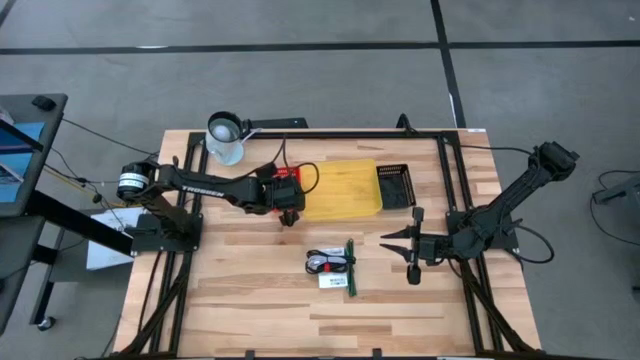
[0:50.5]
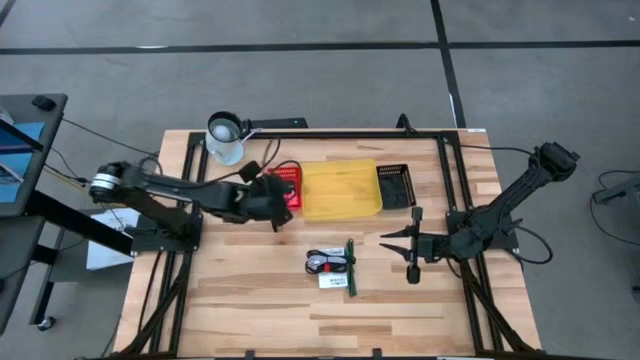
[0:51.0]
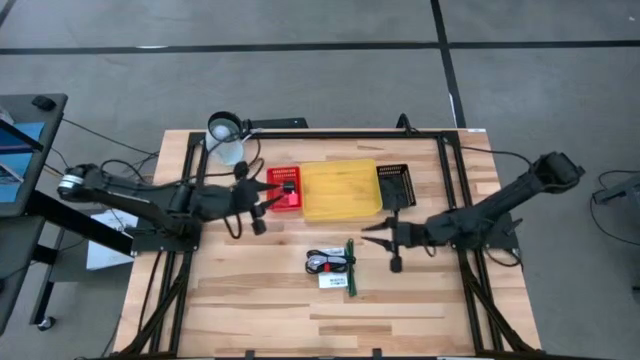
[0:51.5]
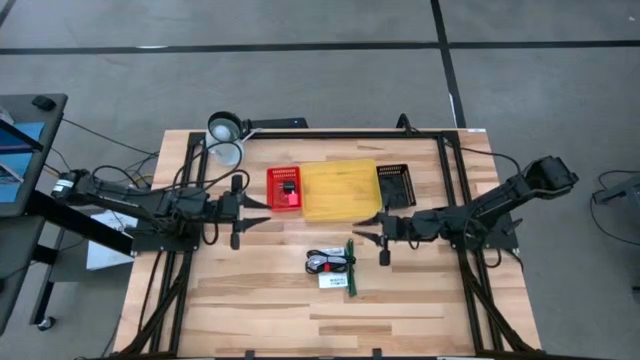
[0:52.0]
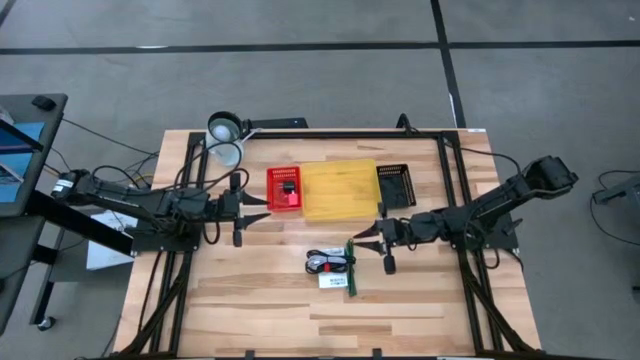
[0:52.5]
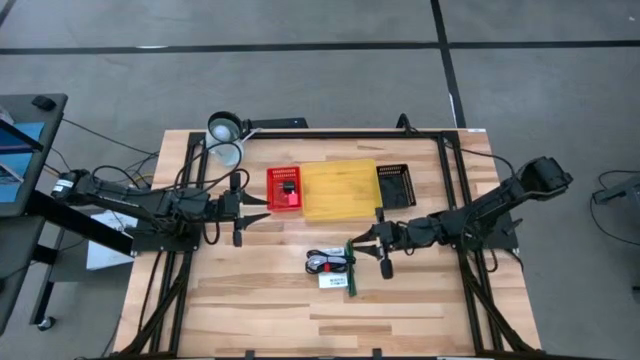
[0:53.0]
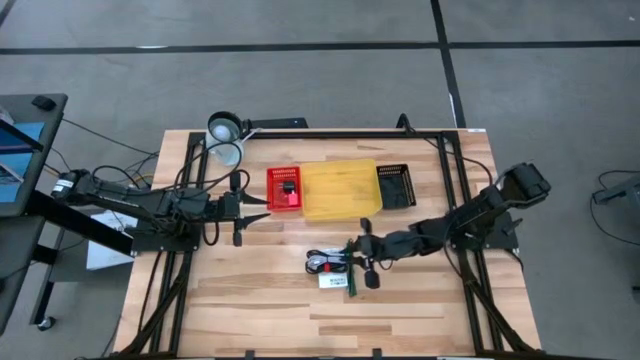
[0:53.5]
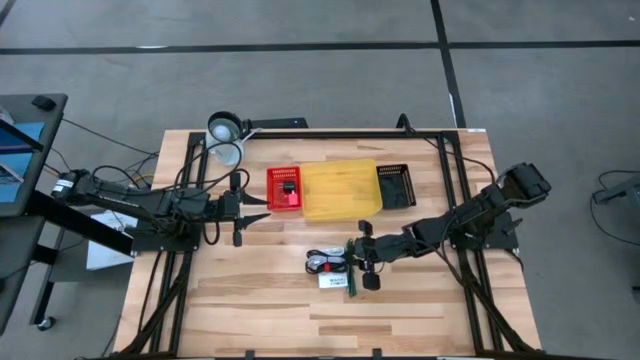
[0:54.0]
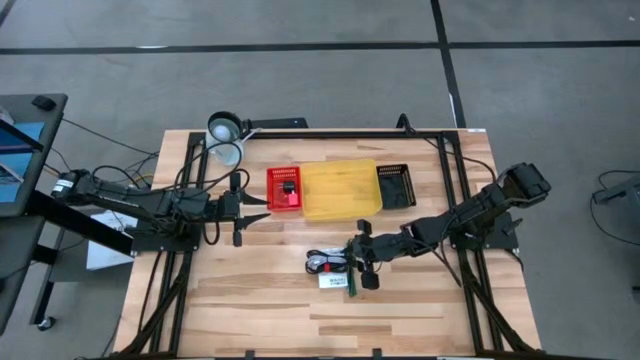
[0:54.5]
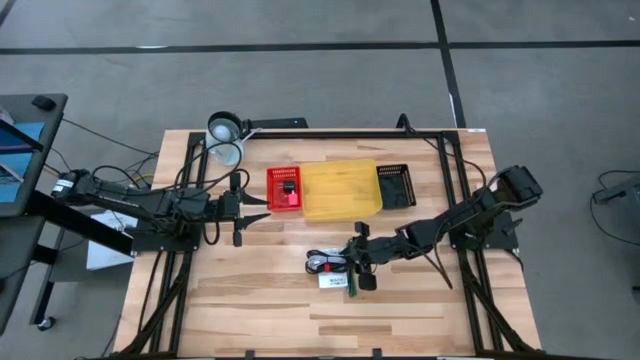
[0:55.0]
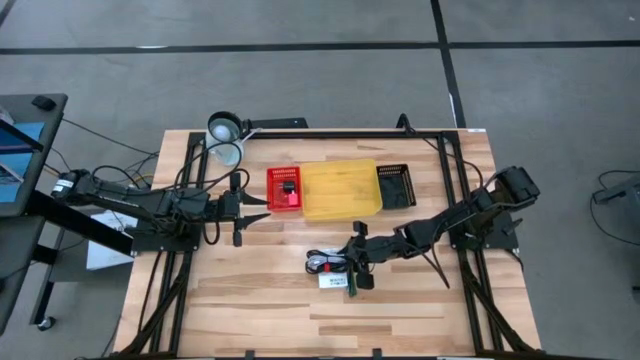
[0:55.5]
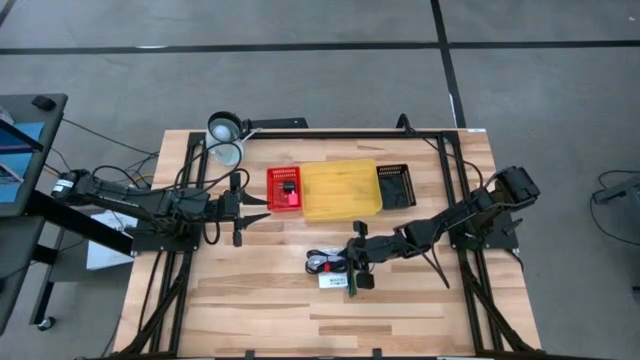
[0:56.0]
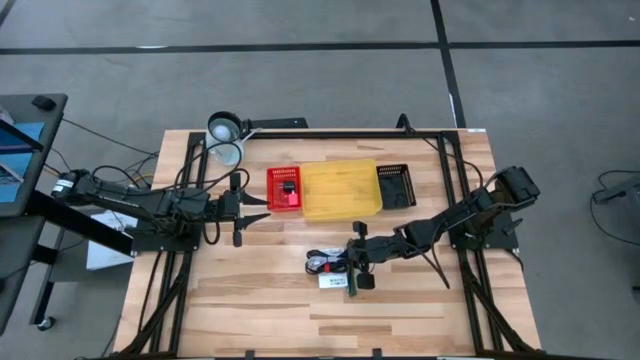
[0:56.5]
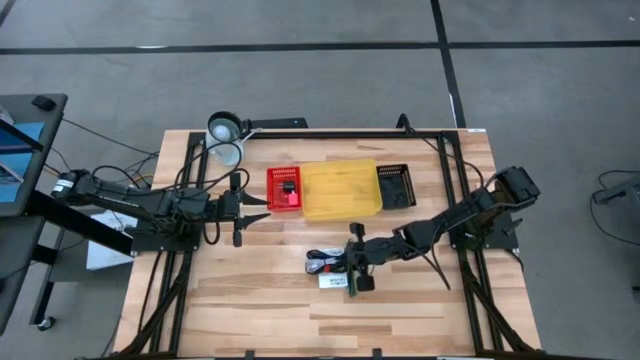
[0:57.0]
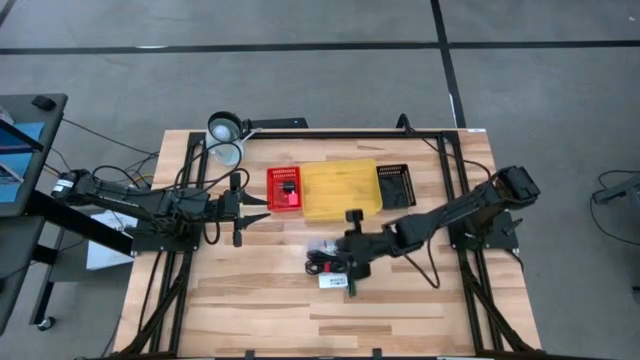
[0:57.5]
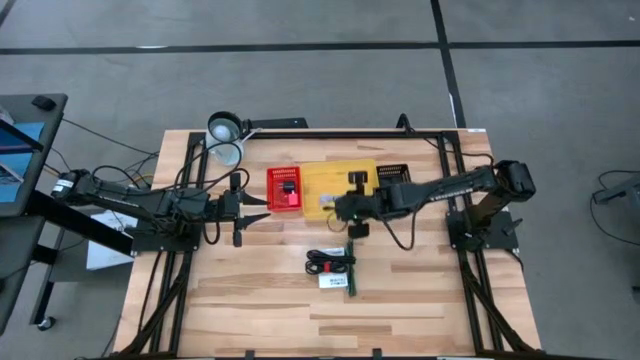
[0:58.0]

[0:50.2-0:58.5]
Task: Pick and place items into bin
Put the white charger cable into the yellow bin

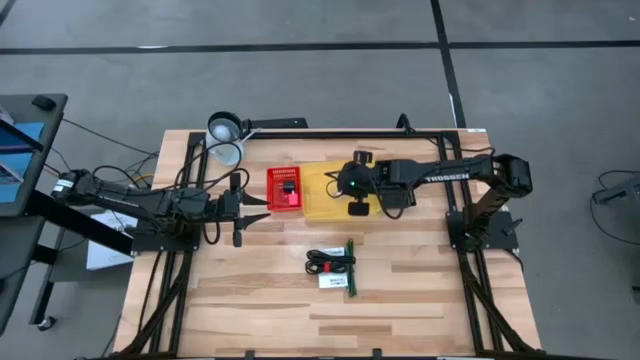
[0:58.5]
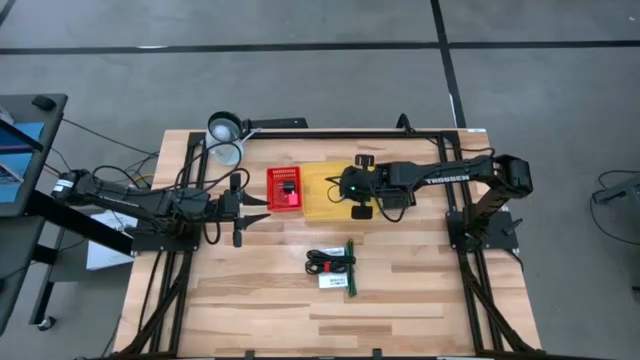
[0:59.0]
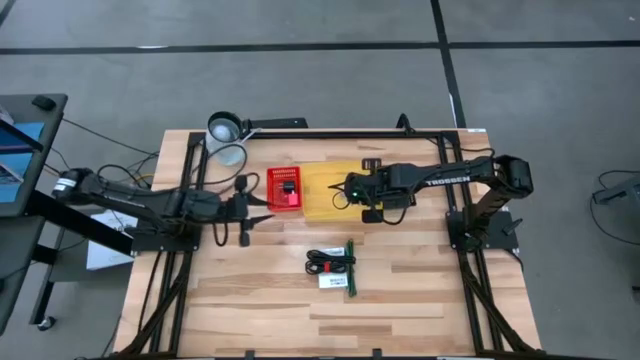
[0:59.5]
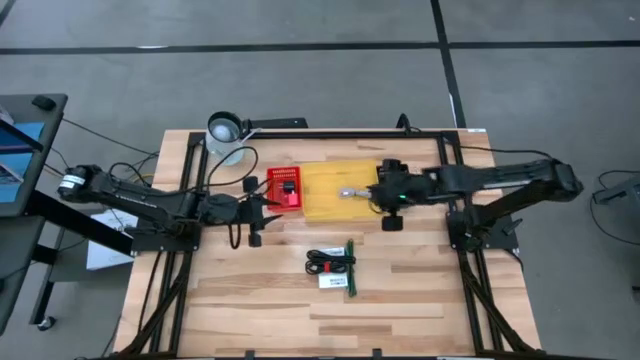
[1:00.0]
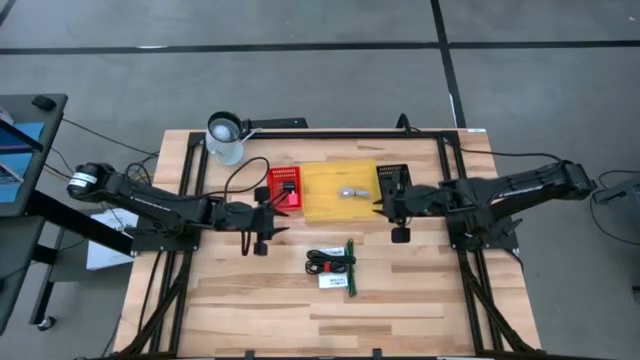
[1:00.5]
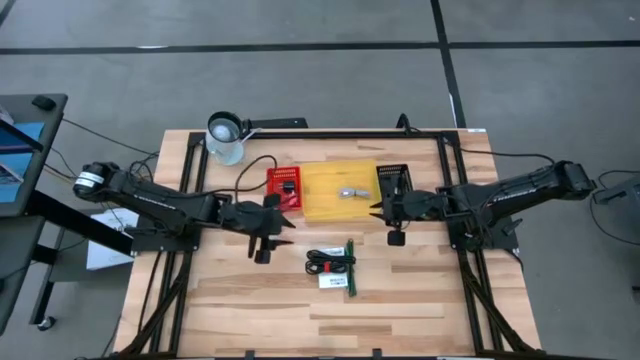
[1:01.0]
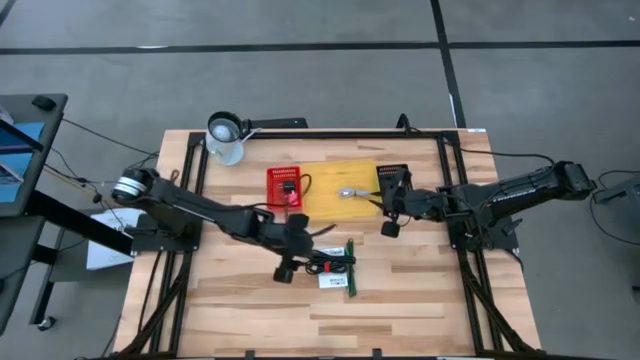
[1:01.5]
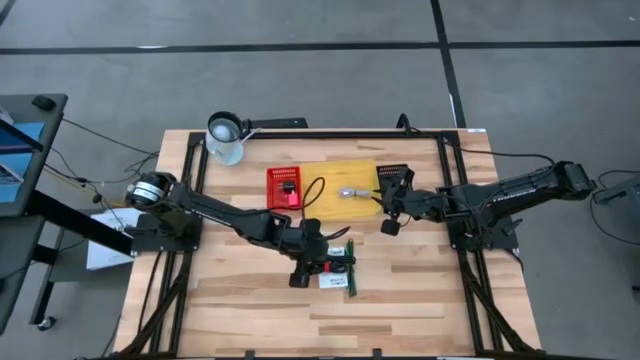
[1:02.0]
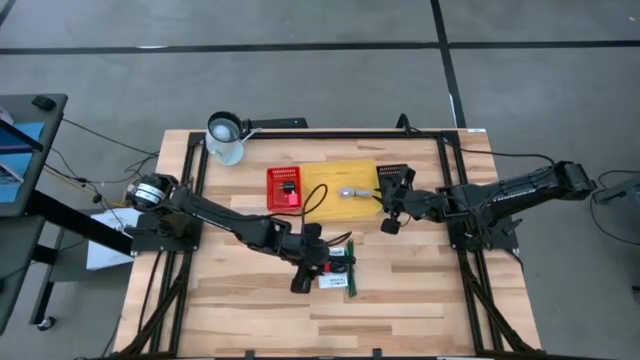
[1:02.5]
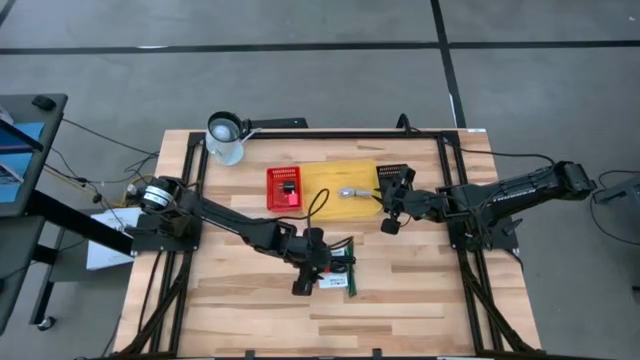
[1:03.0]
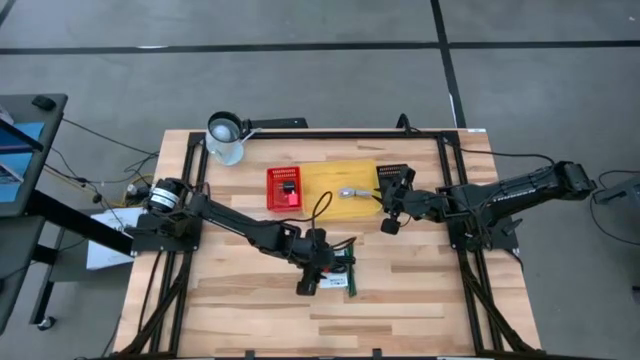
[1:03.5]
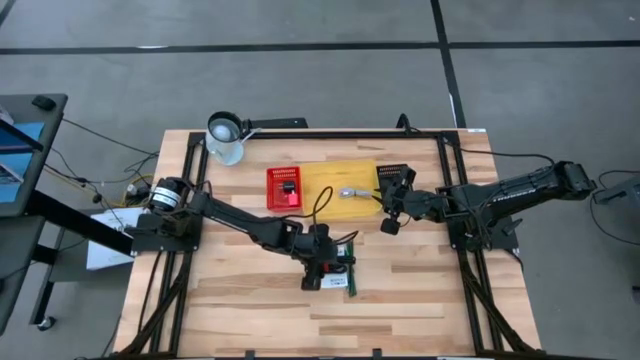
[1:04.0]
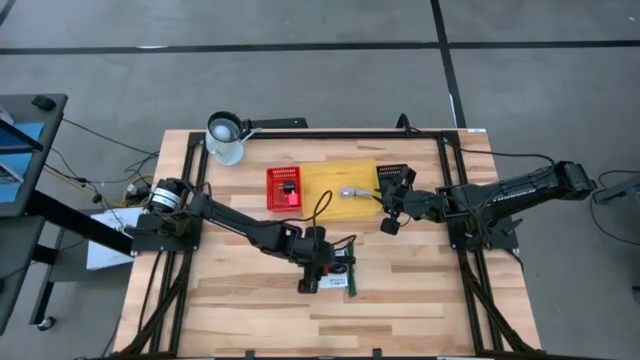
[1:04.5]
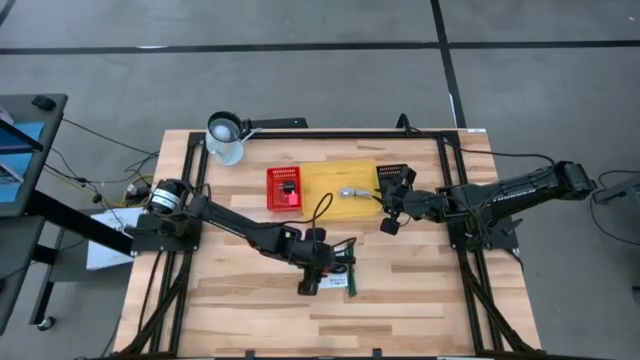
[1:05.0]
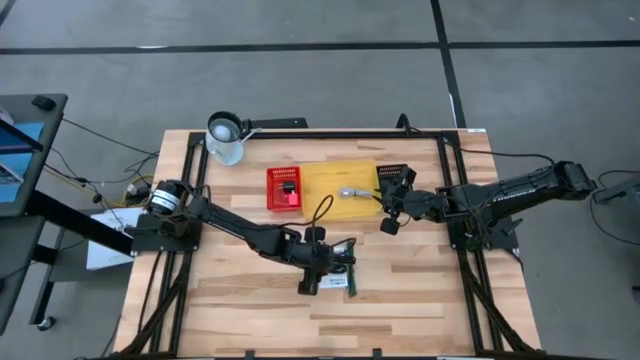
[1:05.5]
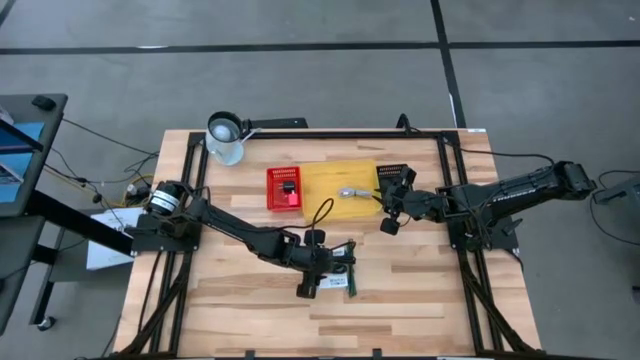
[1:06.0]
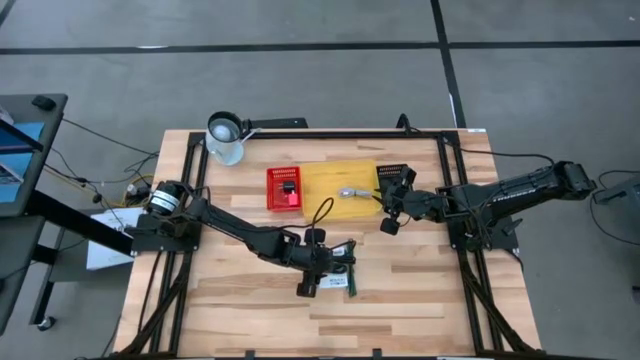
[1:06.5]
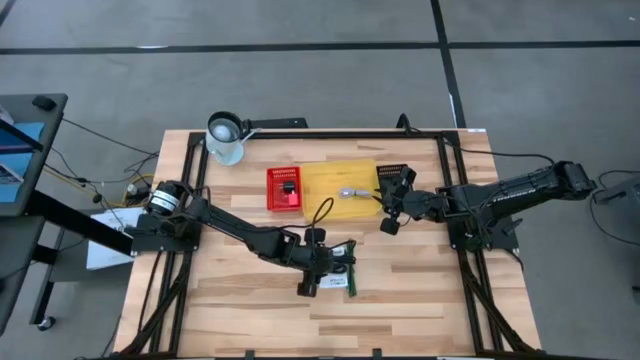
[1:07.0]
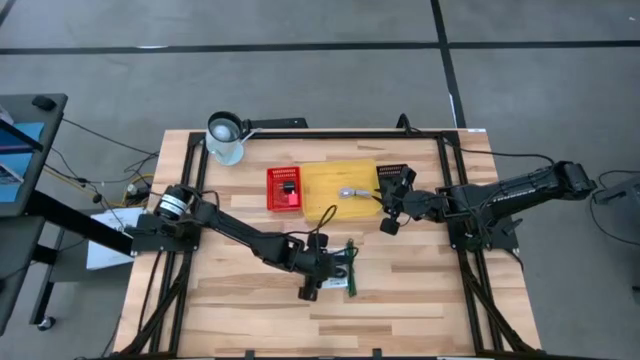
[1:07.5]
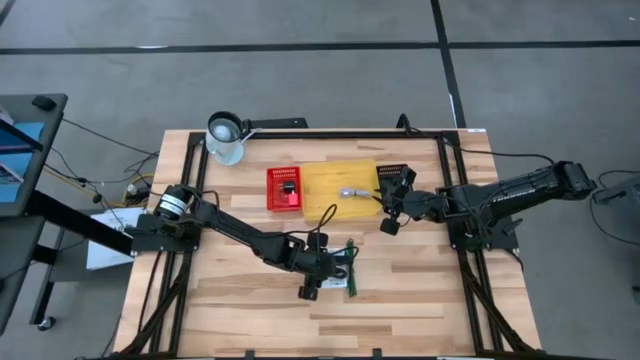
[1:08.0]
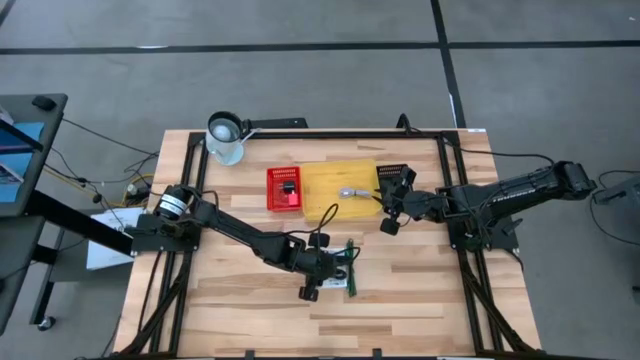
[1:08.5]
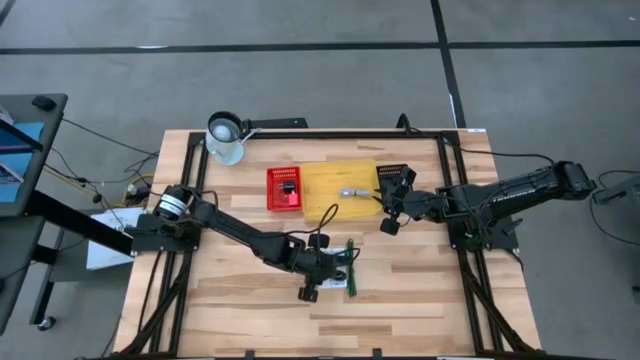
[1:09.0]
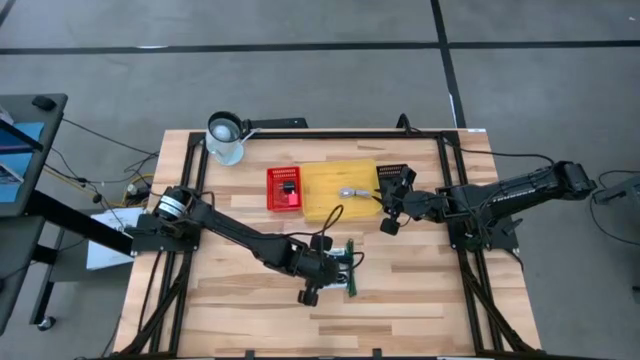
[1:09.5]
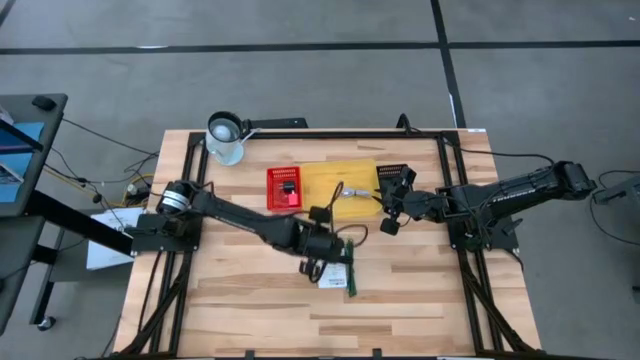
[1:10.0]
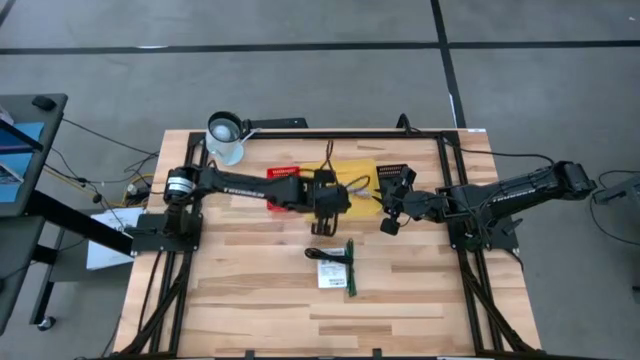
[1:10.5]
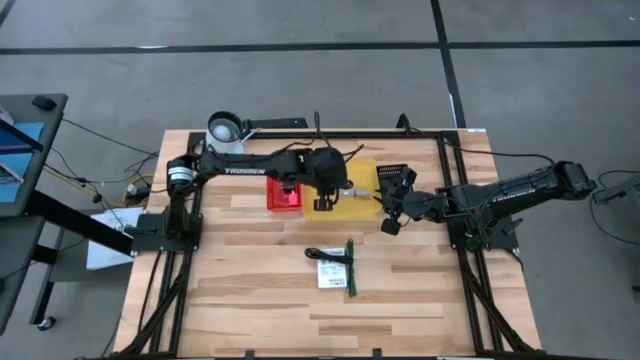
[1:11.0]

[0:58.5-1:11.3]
Put the bottom black charger cable into the yellow bin

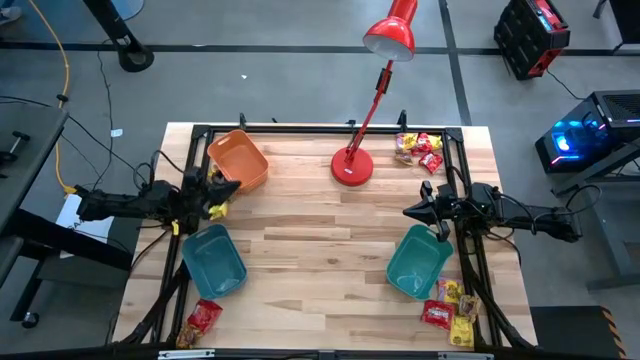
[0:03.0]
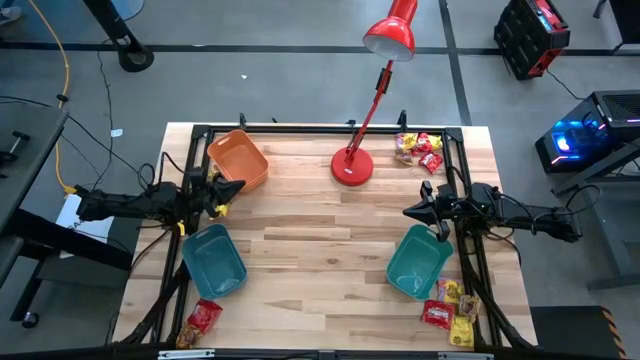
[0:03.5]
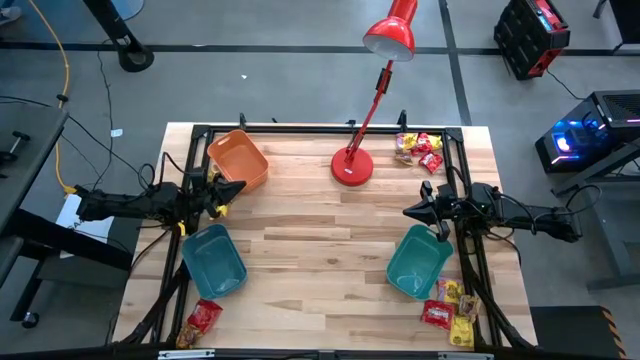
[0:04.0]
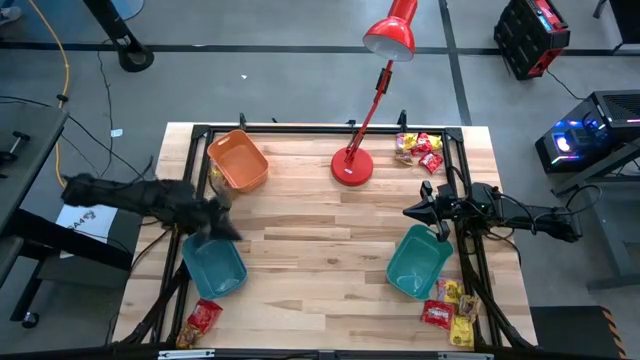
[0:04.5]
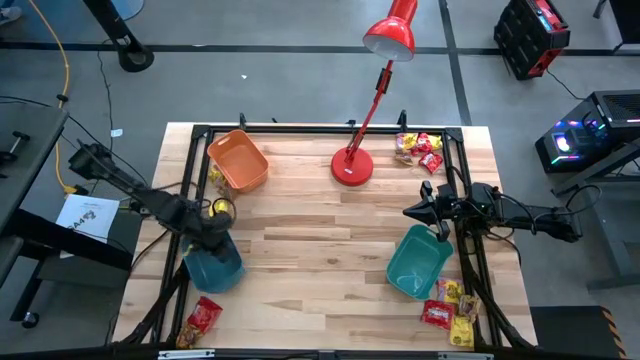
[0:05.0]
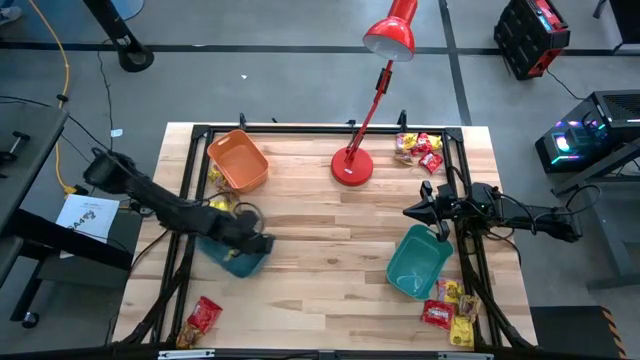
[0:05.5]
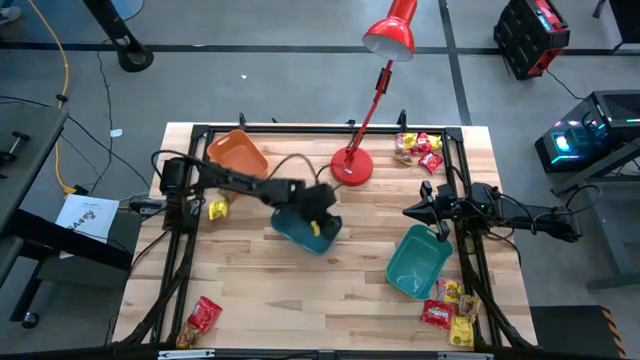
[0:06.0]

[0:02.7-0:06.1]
Task: Sort candy
Move the blue bin to the center of the table
